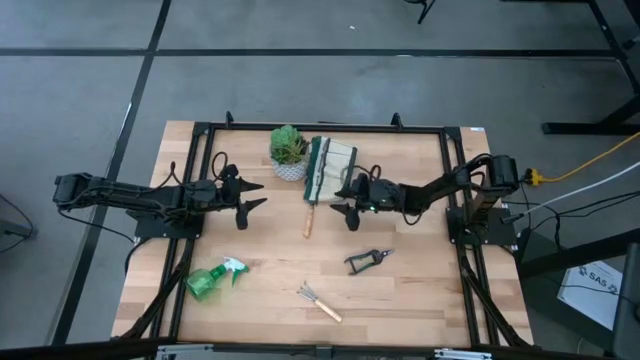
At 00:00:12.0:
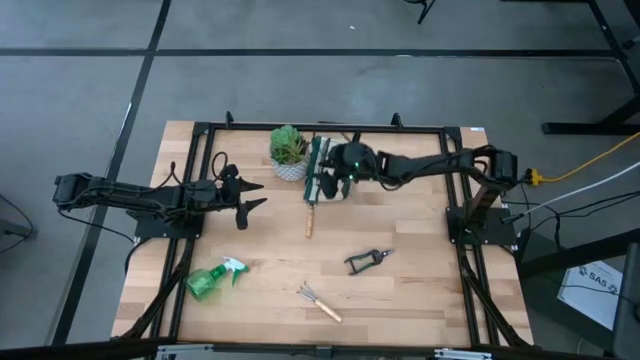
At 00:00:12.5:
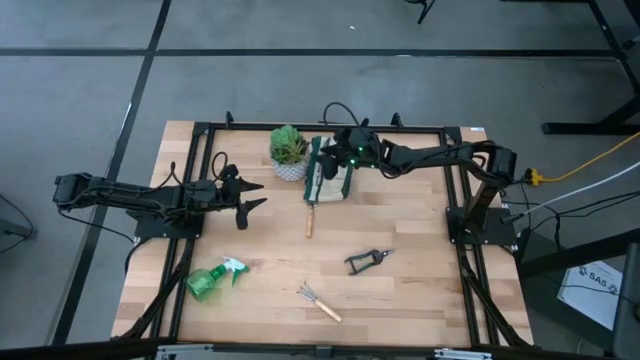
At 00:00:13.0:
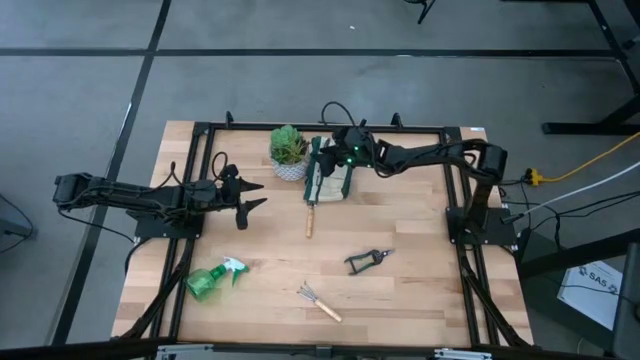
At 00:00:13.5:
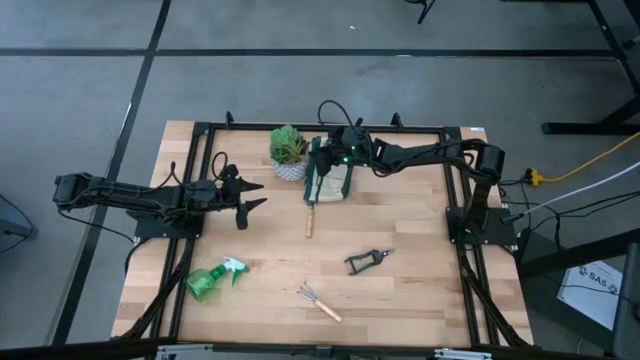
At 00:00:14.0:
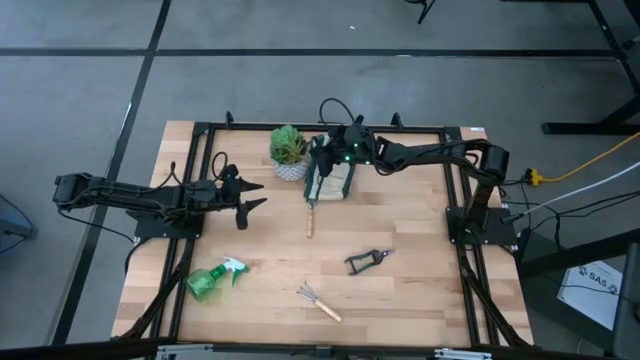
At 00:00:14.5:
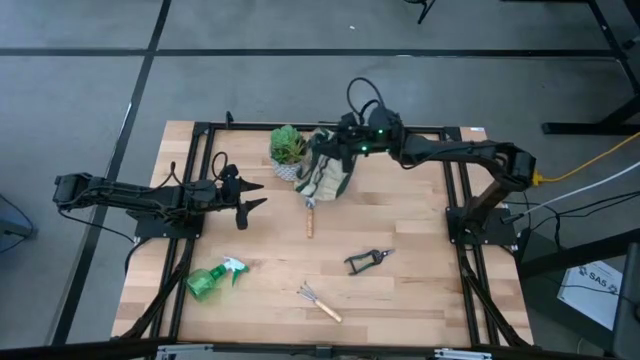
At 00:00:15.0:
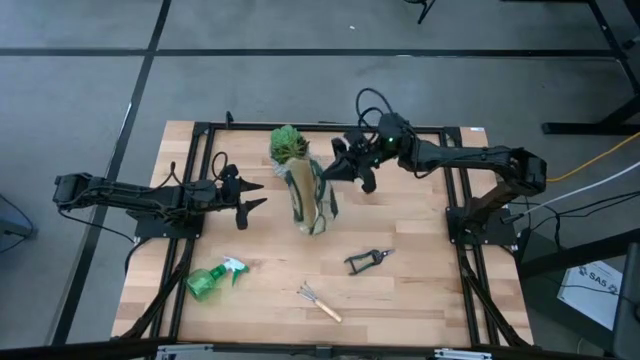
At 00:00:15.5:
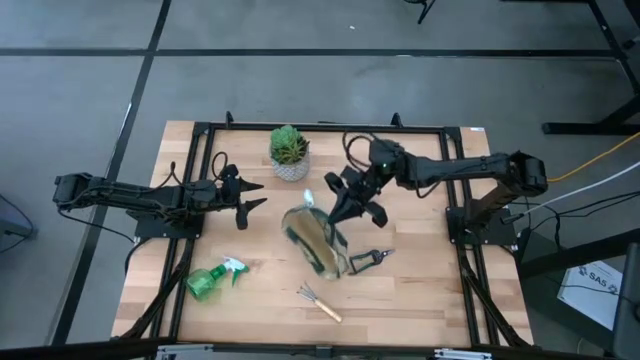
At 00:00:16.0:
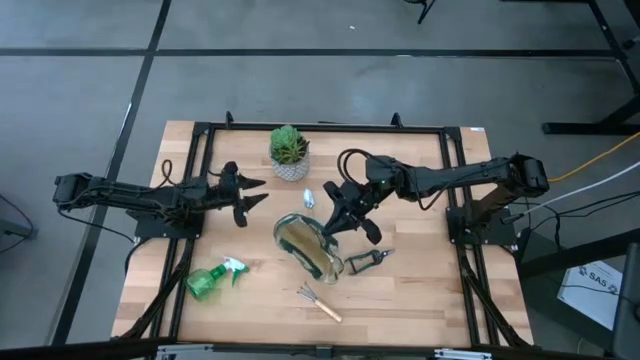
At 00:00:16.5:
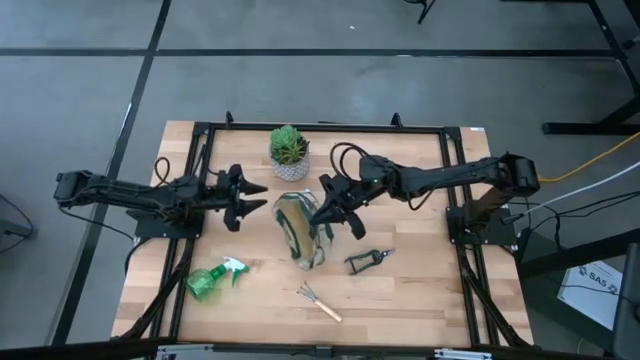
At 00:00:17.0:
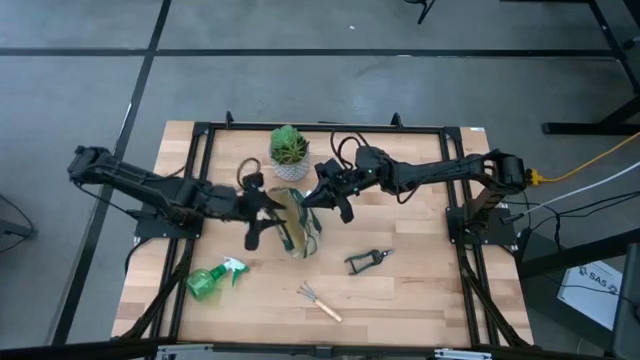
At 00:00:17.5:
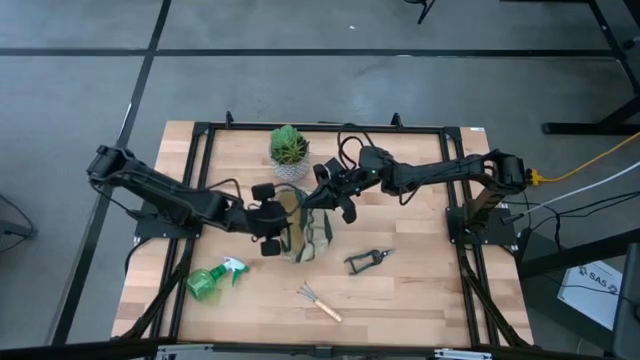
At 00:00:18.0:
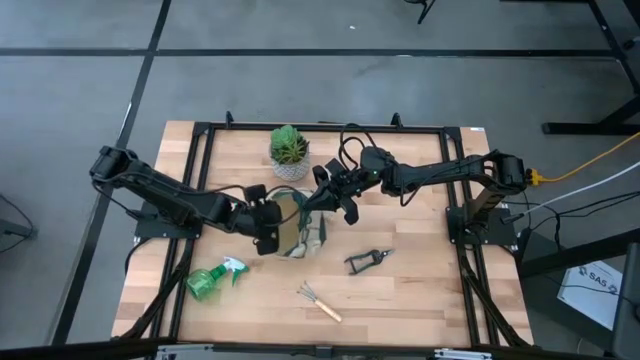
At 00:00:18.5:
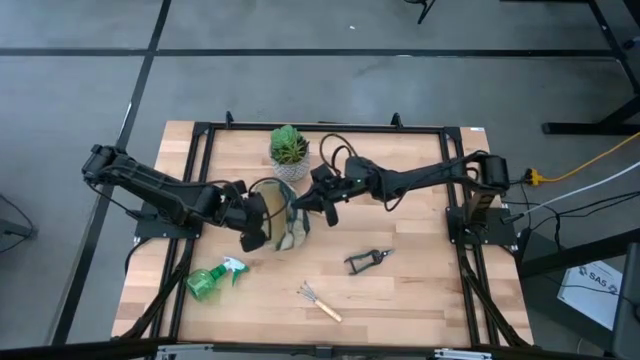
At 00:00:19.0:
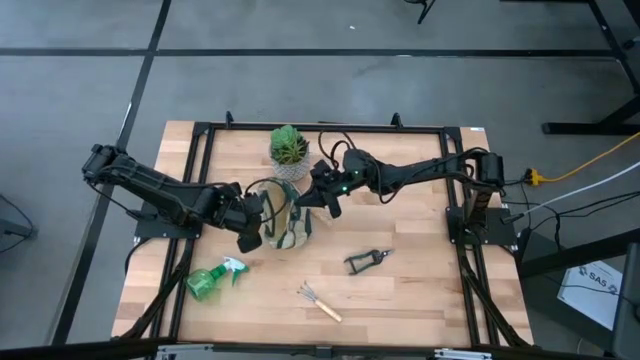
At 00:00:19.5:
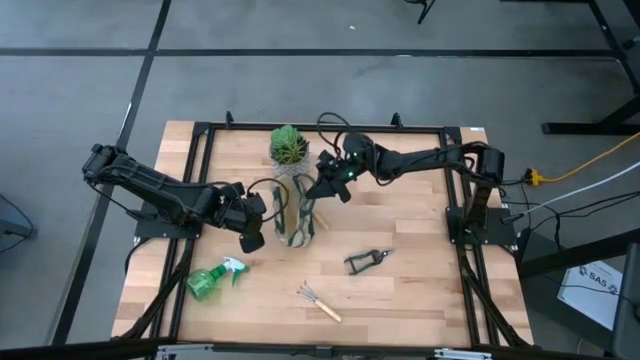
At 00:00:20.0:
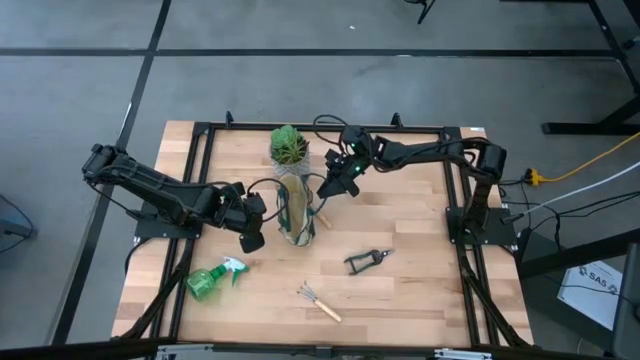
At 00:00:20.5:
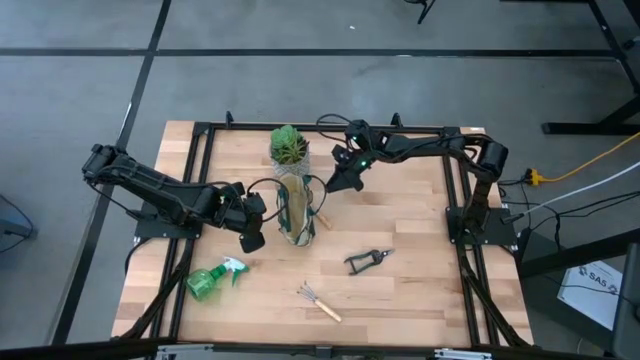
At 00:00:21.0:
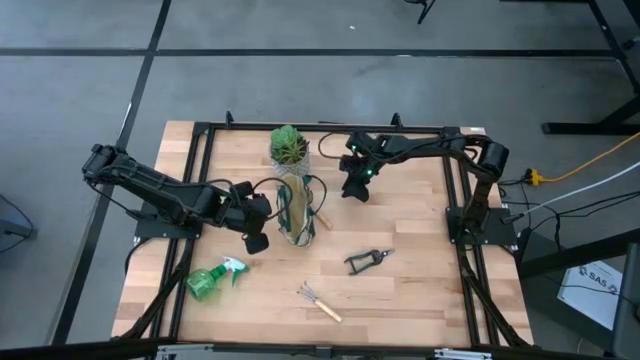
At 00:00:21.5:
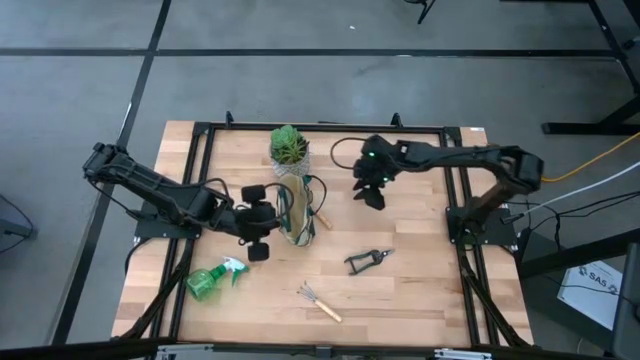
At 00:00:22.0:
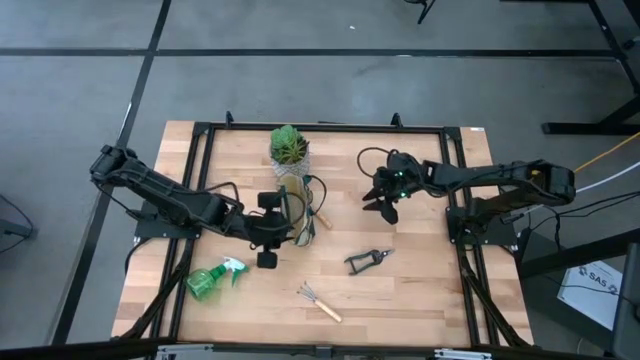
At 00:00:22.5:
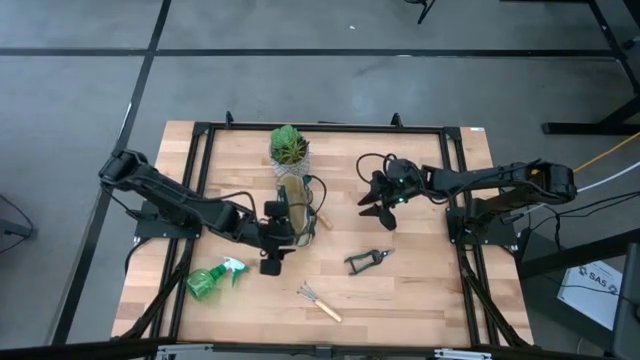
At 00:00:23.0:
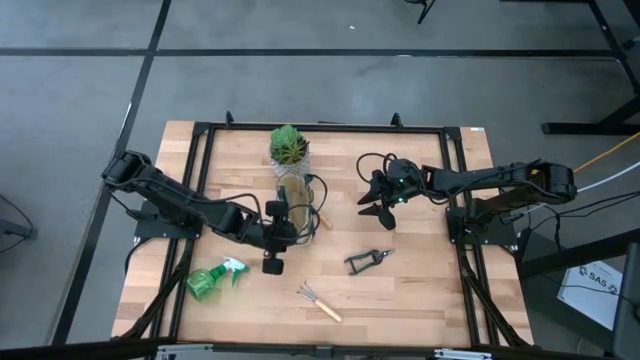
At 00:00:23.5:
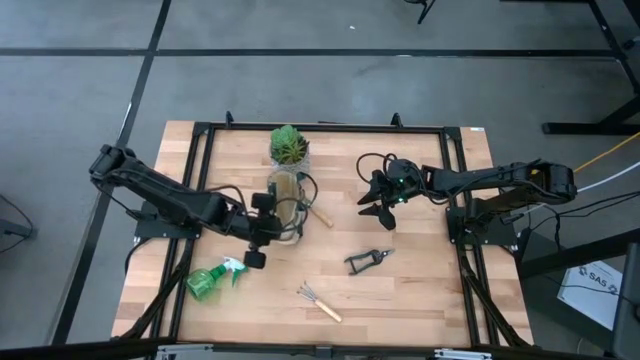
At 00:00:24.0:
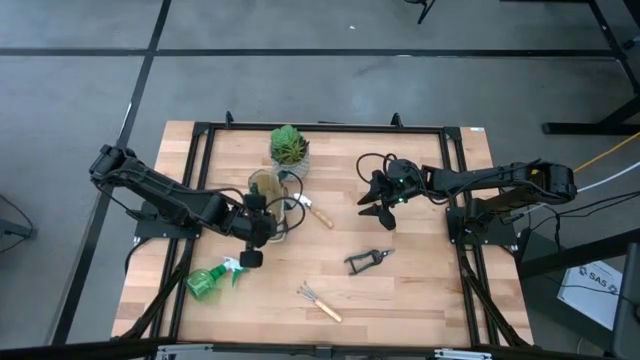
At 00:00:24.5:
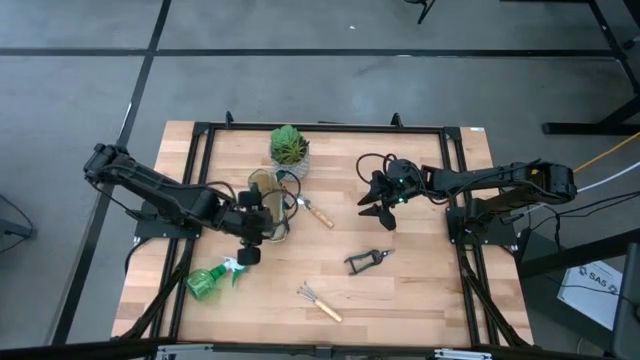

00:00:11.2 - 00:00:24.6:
Task: Pick & Place Garden tools in Gardening bag
Prepare the gardening bag

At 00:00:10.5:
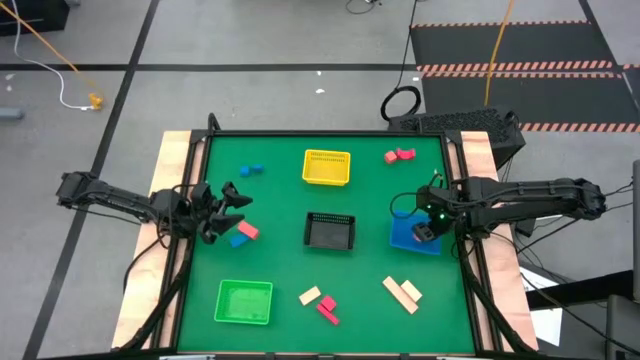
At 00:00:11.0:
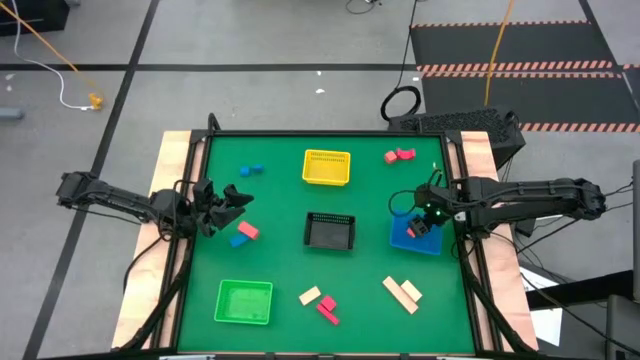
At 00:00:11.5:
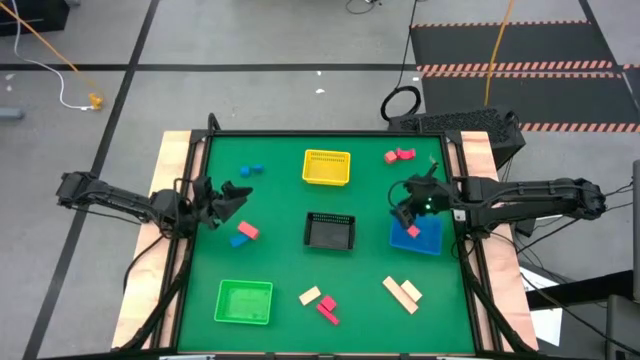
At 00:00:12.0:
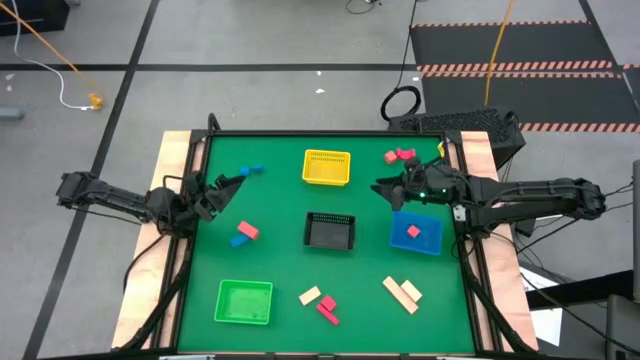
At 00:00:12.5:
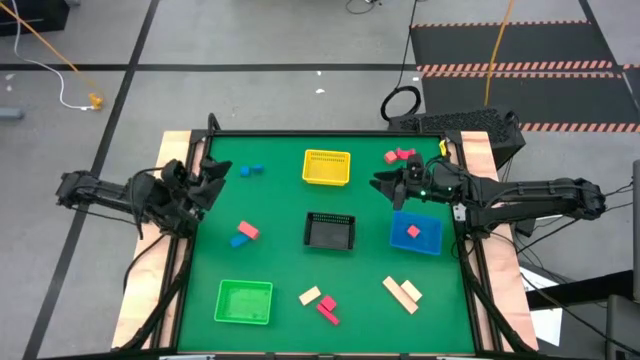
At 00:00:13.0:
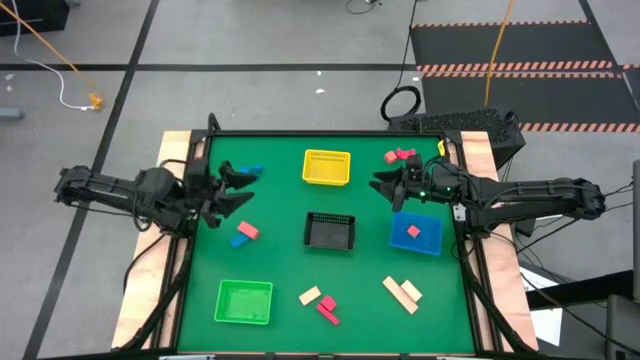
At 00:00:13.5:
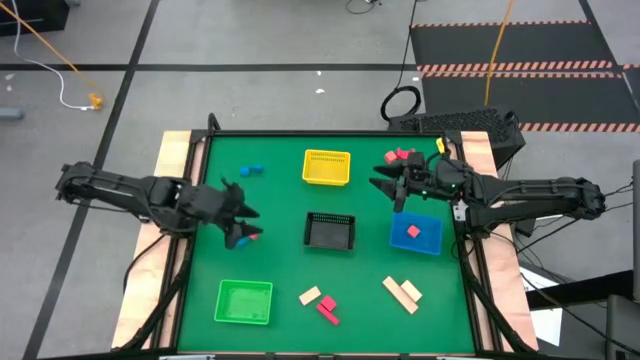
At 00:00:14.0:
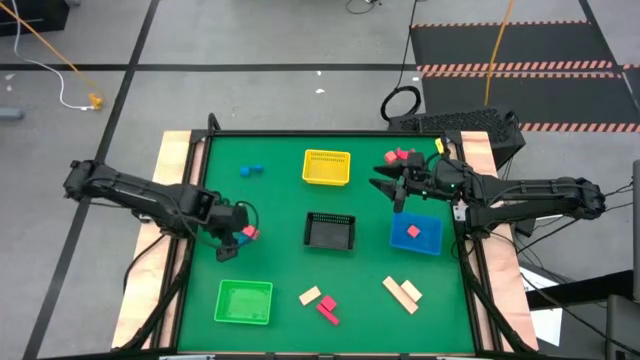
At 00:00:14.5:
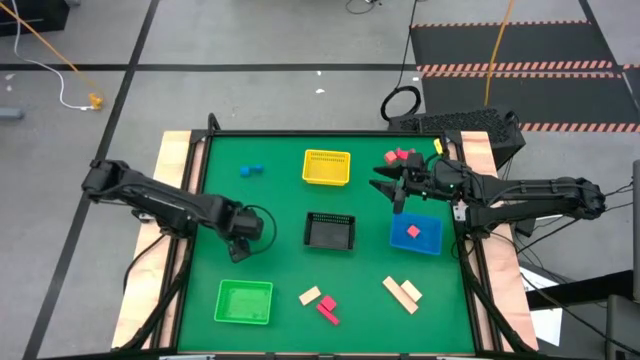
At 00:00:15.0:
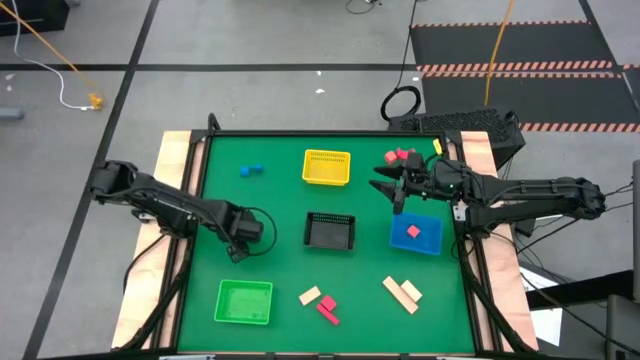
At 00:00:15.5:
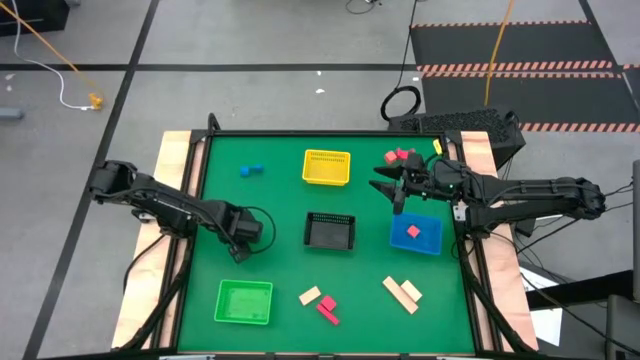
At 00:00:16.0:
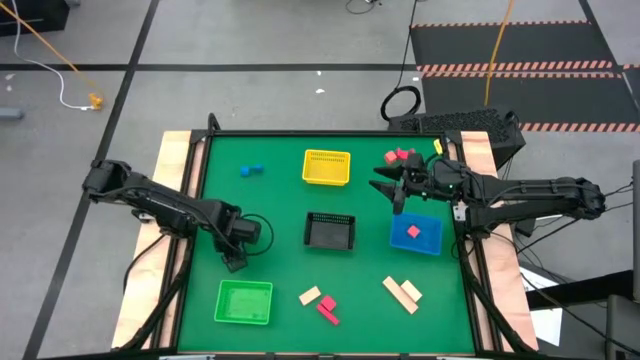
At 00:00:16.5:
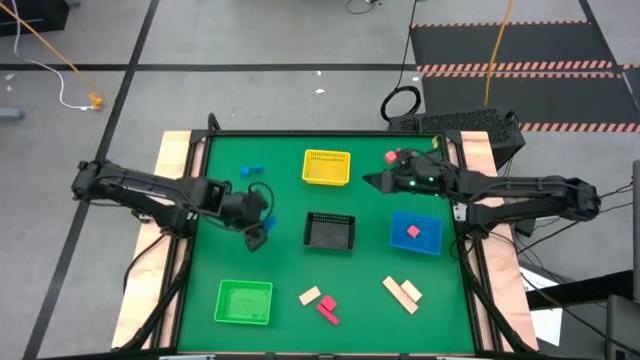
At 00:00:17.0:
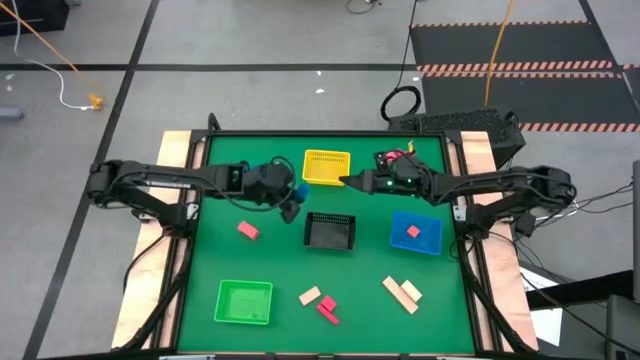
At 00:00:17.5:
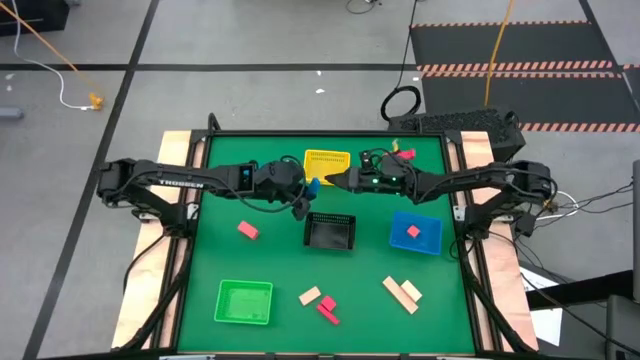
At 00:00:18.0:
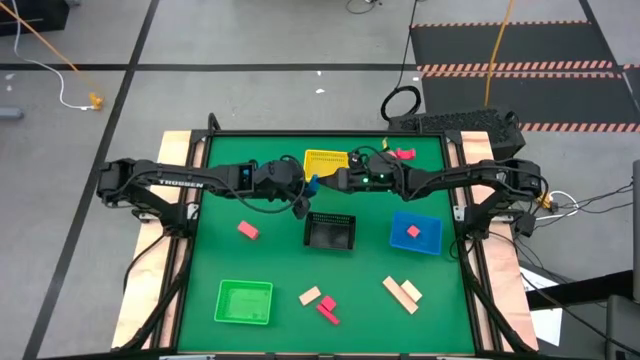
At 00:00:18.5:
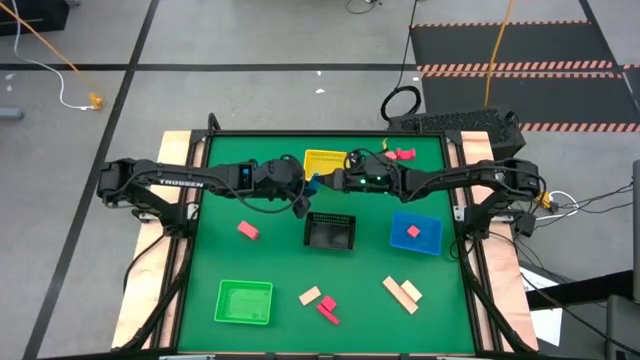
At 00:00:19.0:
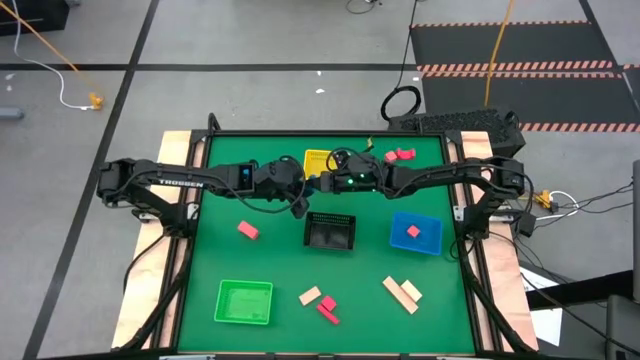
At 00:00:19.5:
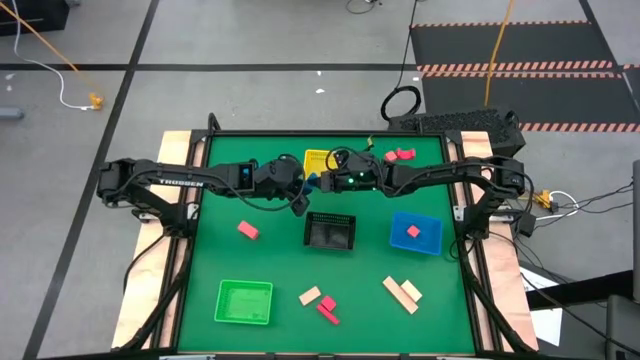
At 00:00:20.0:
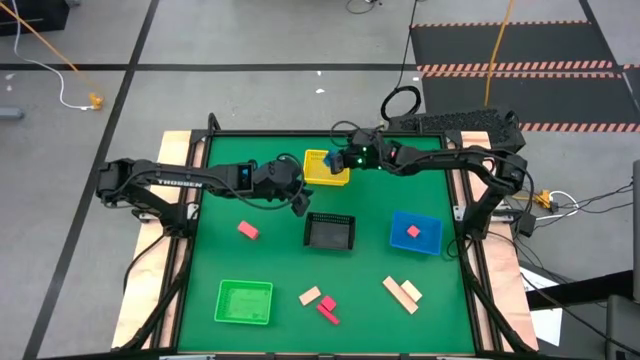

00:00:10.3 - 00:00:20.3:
Task: Sort & place blocks by color
Put the bottom left blue block into the yellow bin
